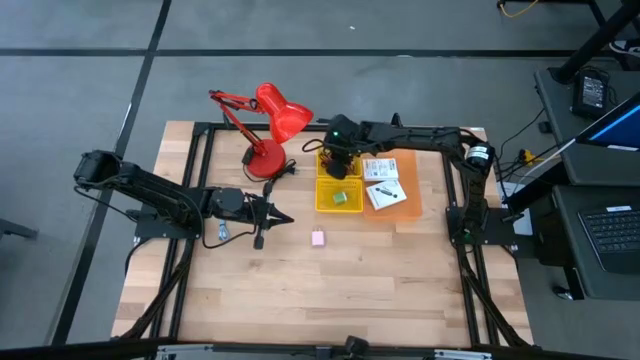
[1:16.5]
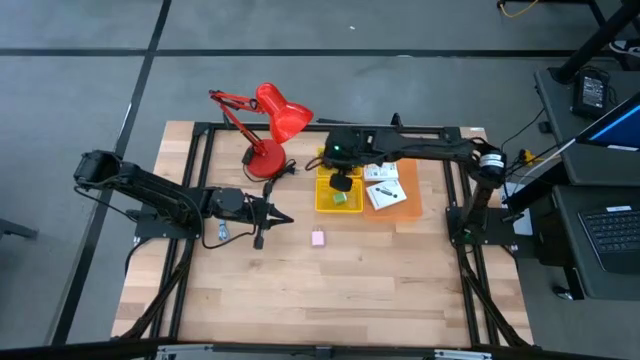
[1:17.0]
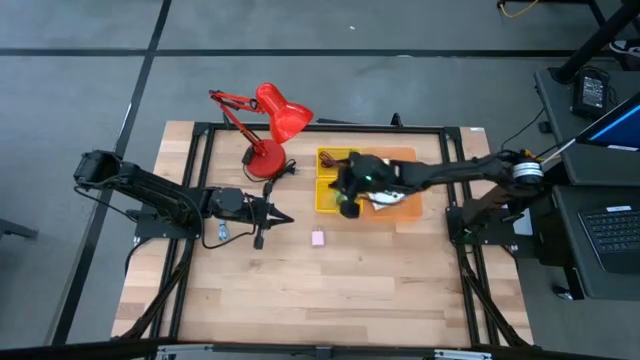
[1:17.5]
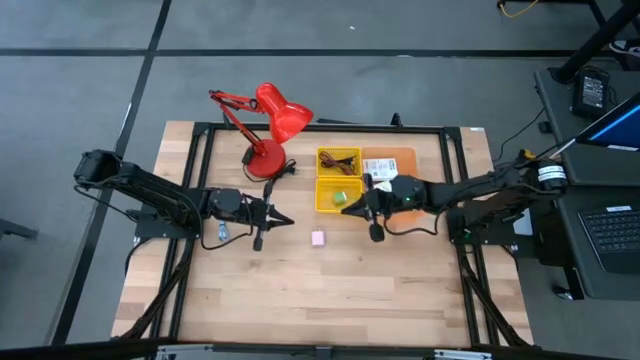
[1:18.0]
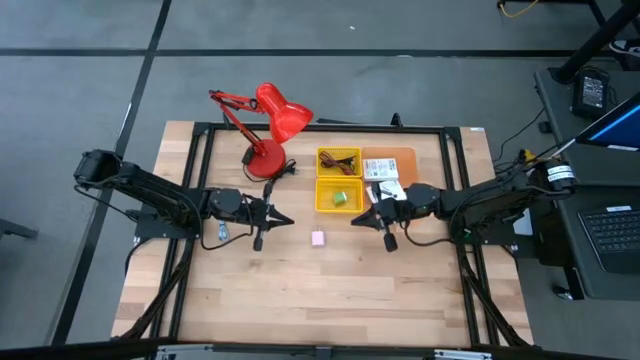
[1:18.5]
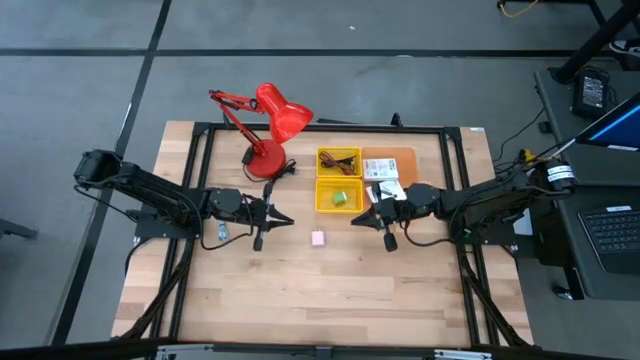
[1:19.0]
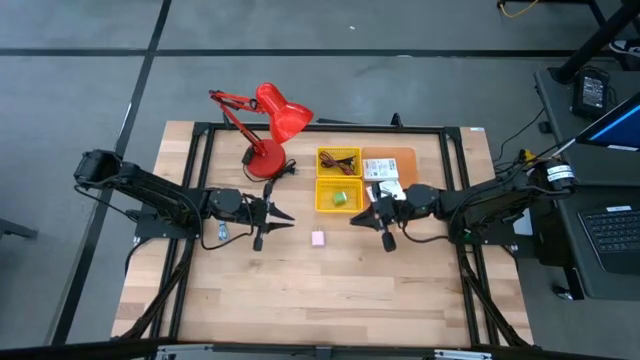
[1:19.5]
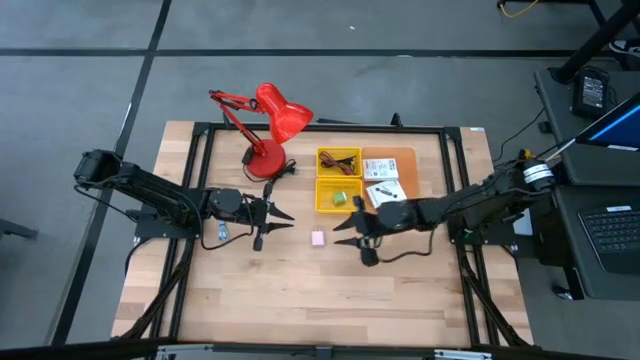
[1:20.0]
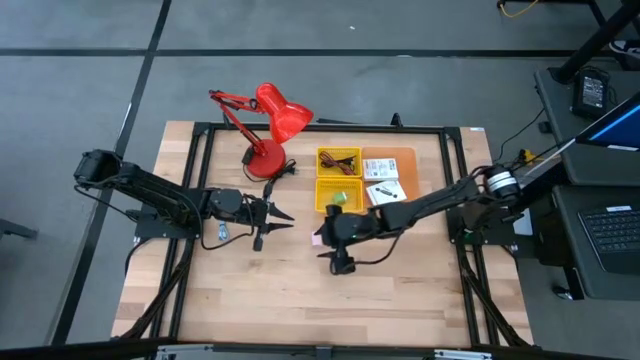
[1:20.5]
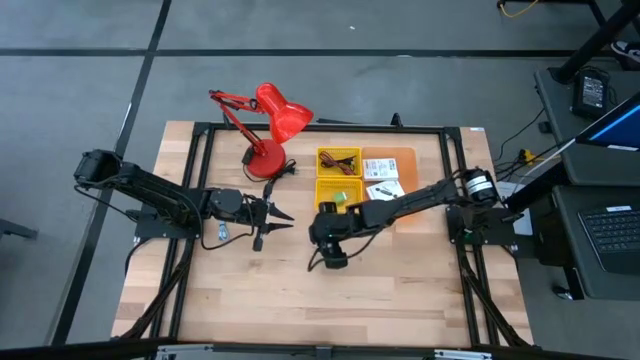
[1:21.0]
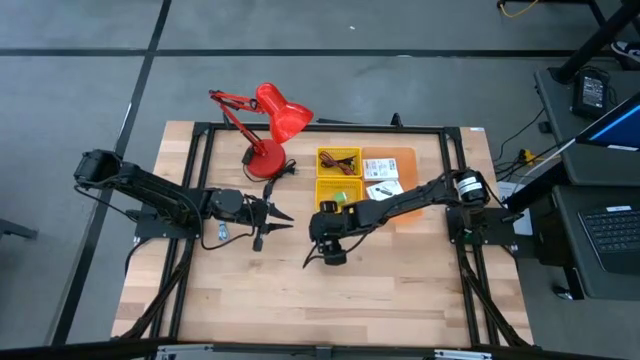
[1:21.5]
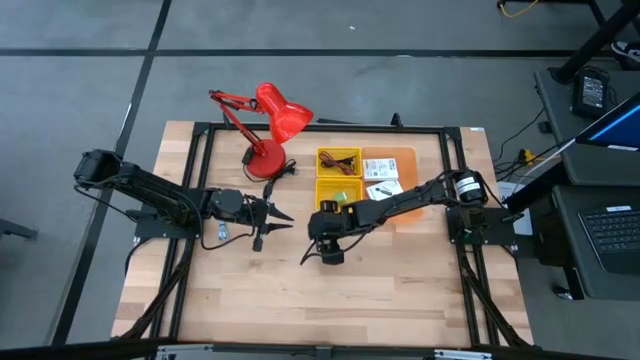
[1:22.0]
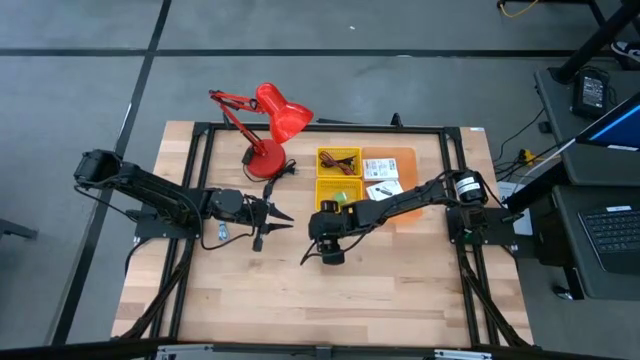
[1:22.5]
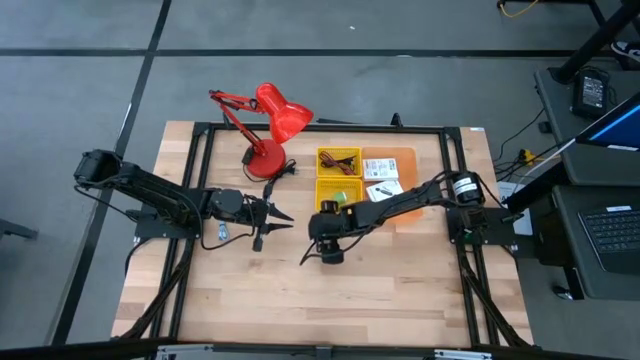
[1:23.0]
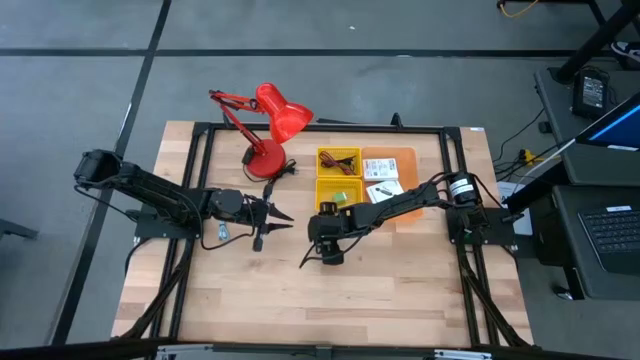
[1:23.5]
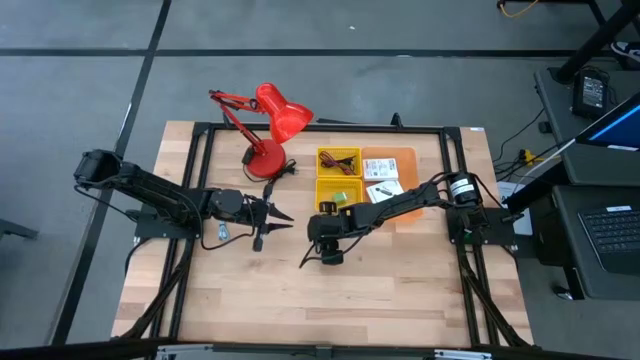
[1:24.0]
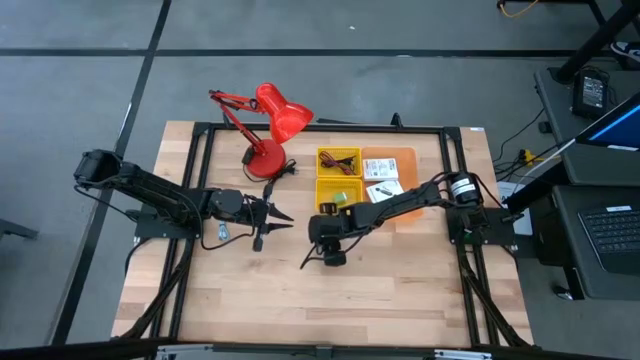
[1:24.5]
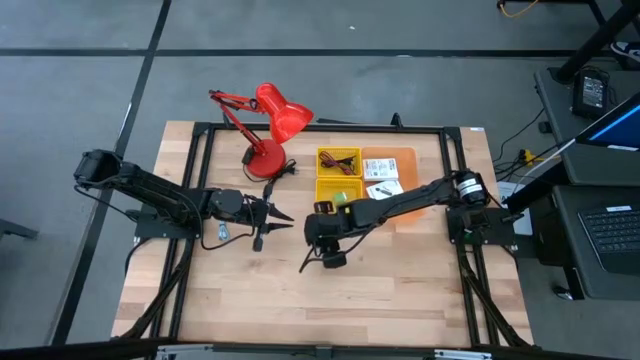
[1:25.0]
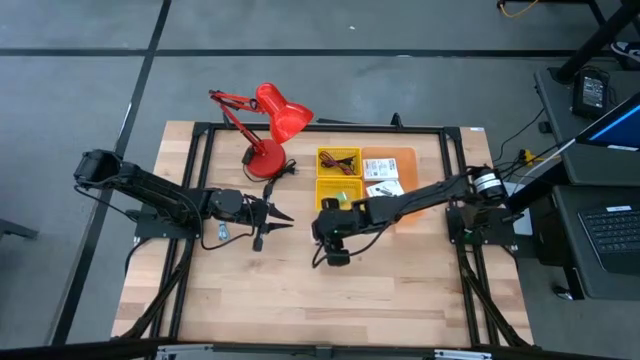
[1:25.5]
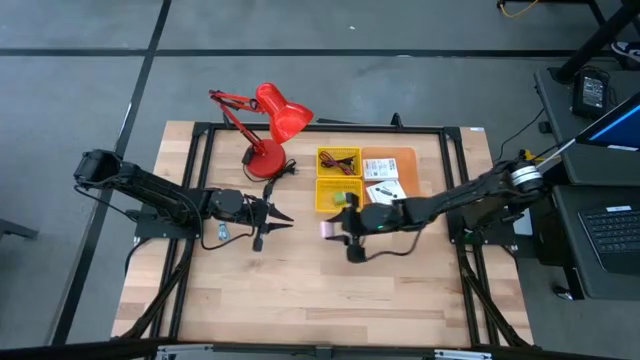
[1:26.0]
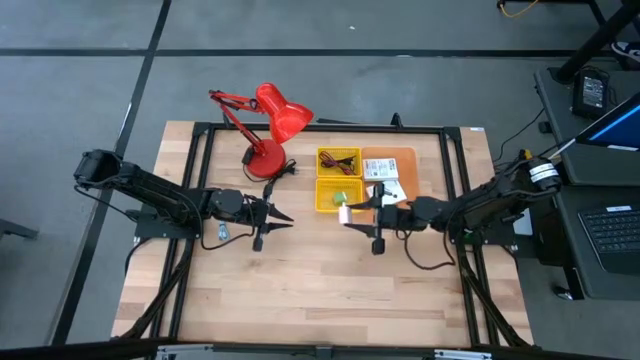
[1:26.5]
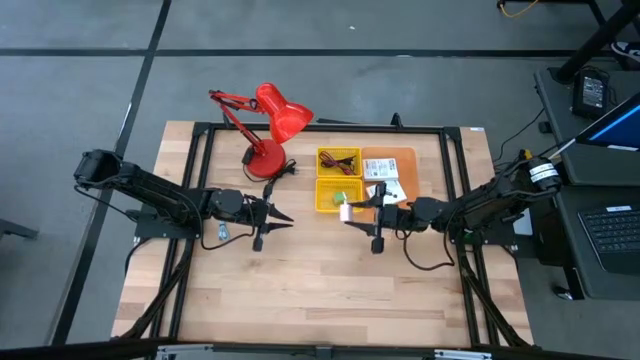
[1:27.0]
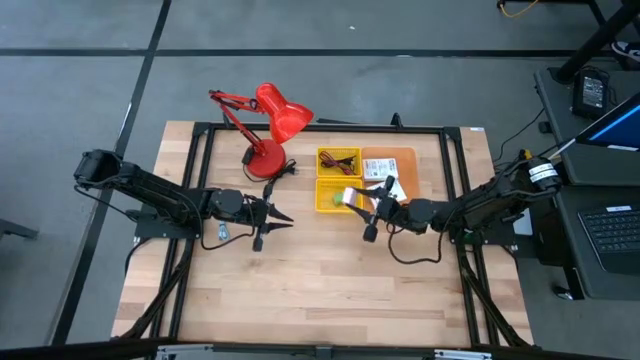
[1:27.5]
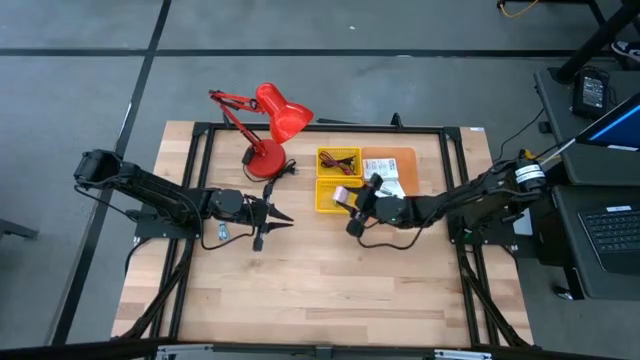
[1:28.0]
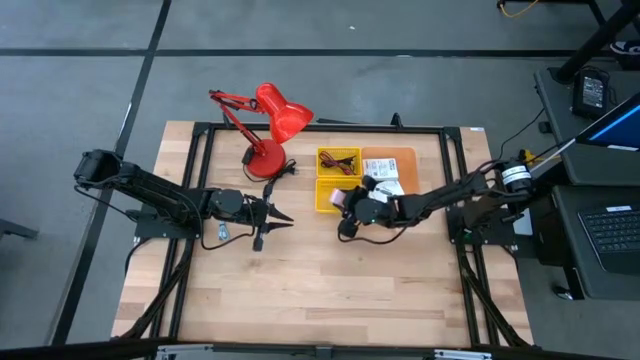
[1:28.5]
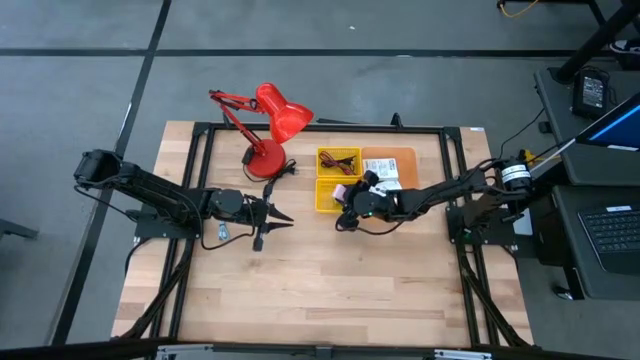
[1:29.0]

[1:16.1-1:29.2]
Task: Pick and place items into bin
Put the light pink charger adapter into the bottom yellow bin

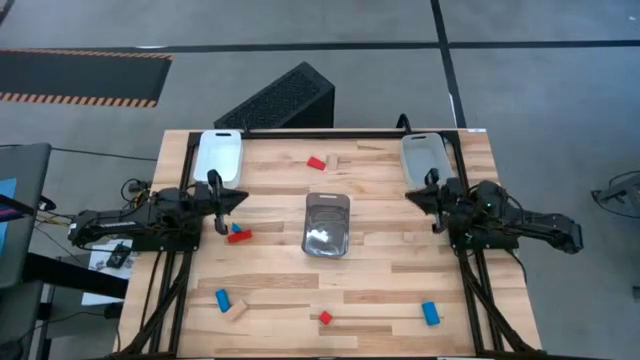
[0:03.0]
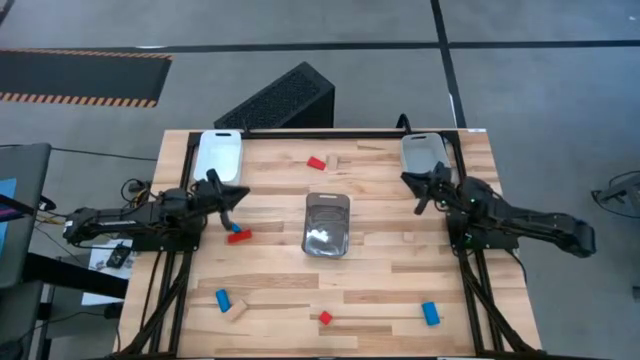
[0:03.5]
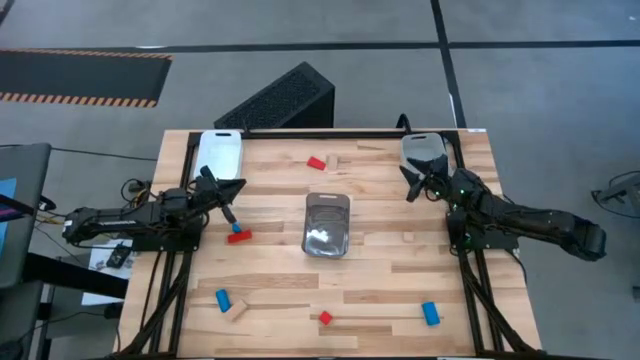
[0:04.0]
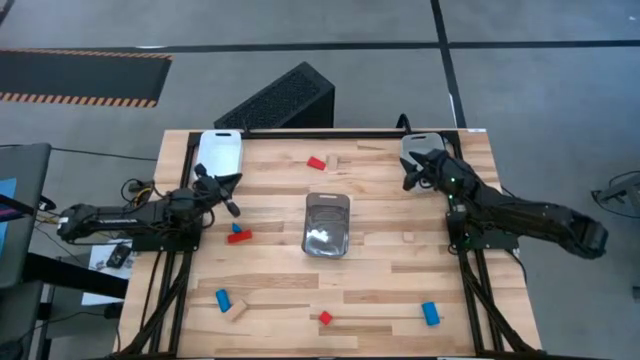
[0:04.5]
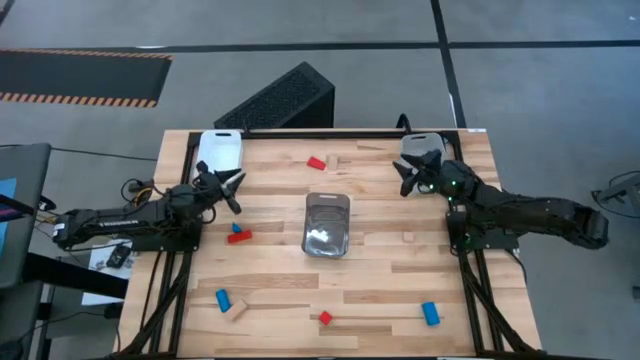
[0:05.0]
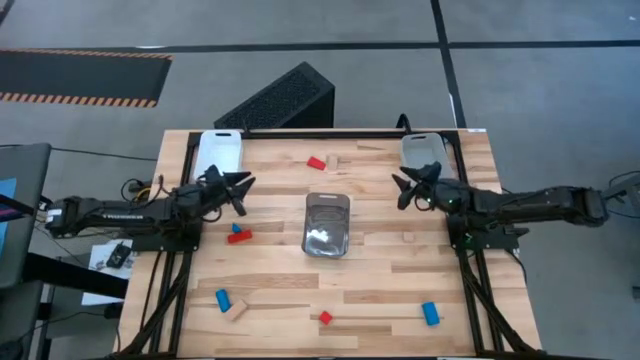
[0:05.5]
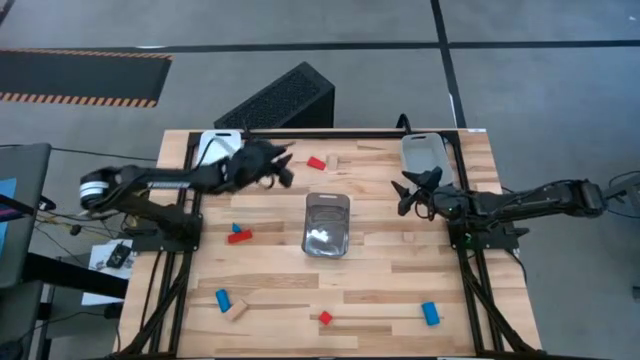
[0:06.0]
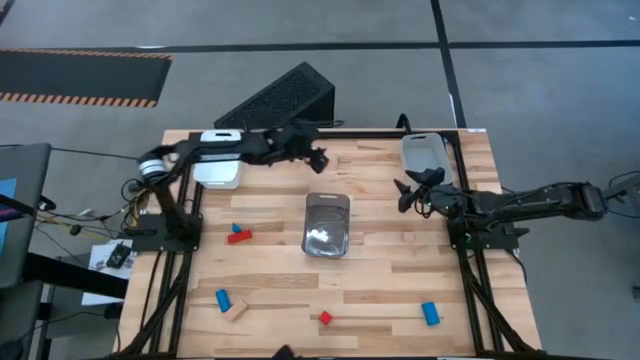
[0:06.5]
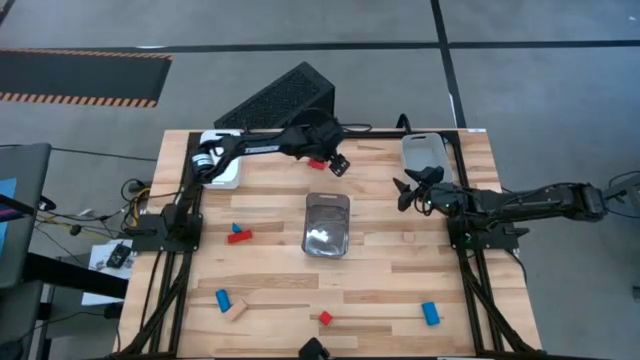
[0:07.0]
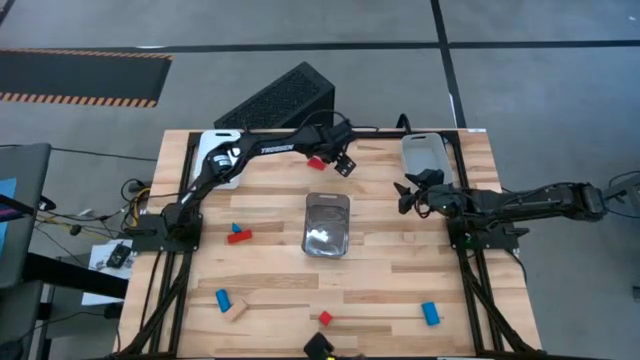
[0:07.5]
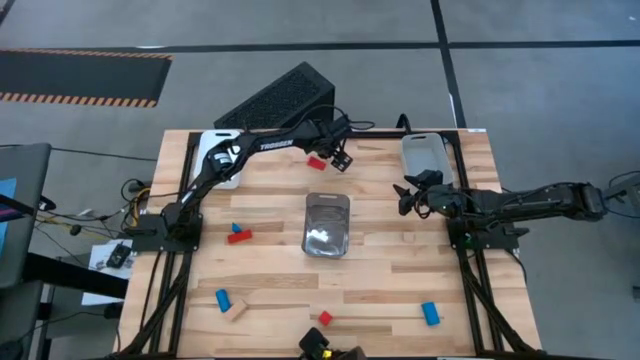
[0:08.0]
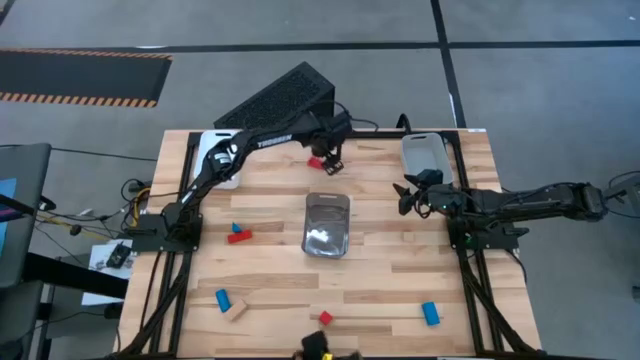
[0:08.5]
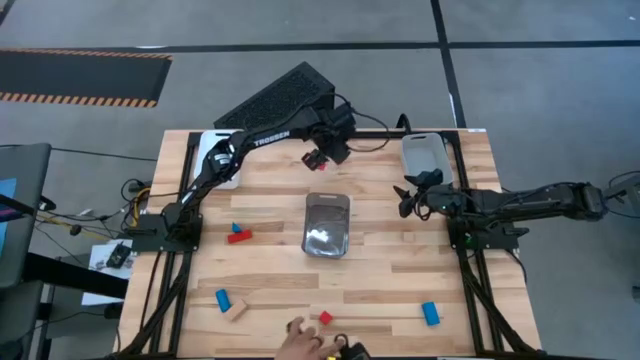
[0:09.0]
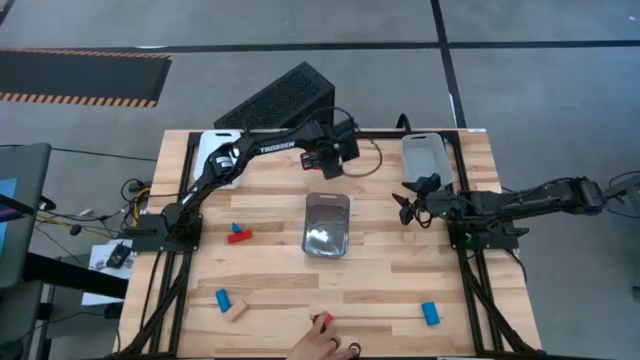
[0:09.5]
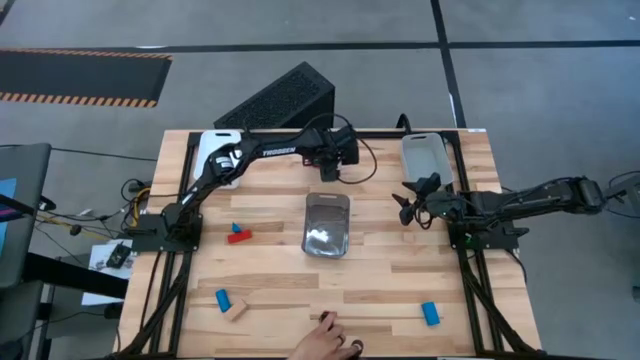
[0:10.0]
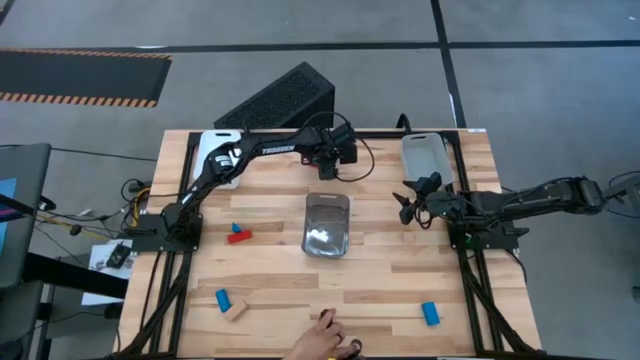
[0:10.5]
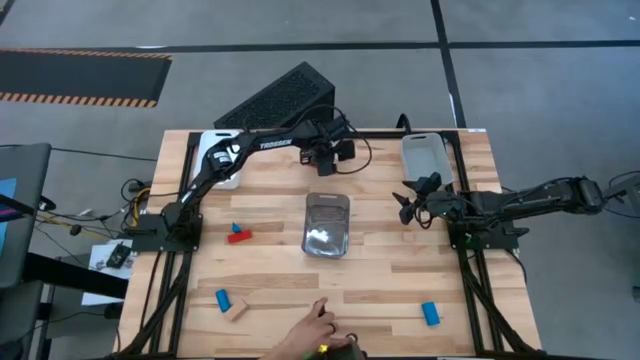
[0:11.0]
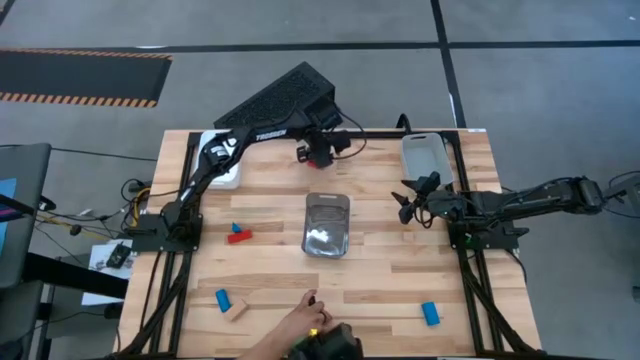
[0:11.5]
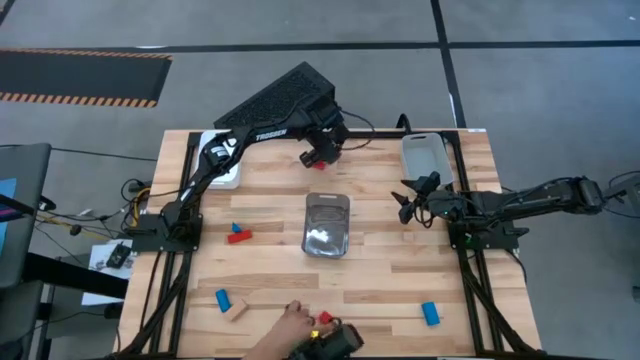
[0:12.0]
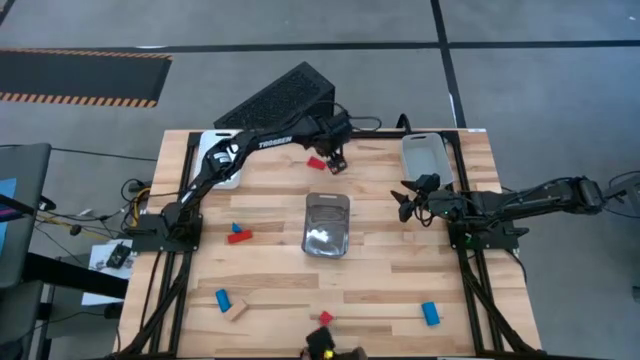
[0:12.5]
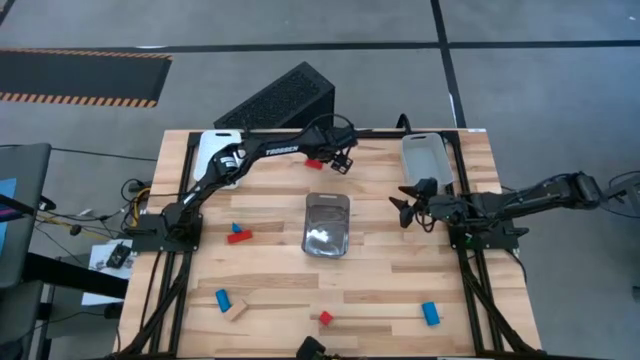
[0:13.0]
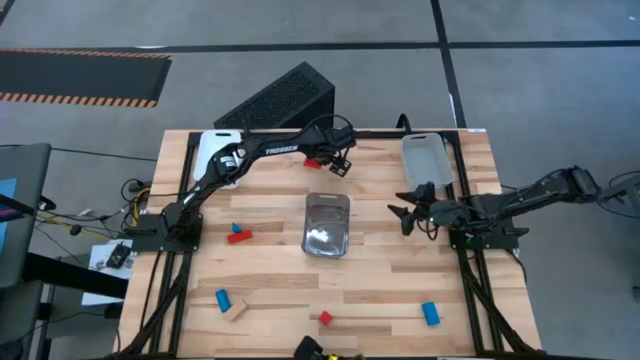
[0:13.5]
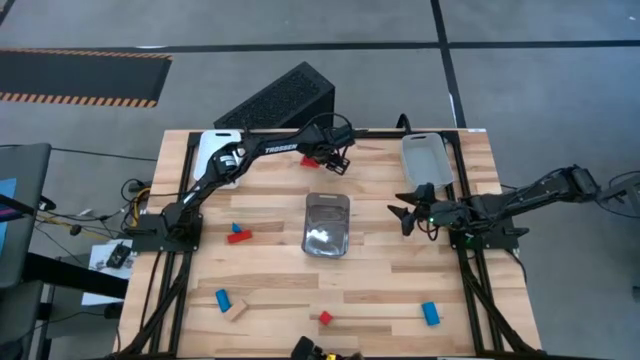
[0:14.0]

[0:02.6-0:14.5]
Task: Sort & place blocks by color
Put the top brown block into the white bin
